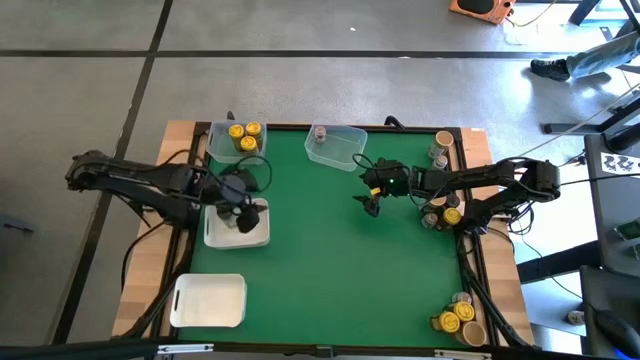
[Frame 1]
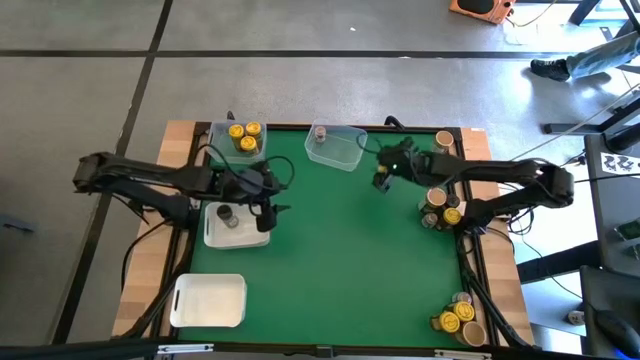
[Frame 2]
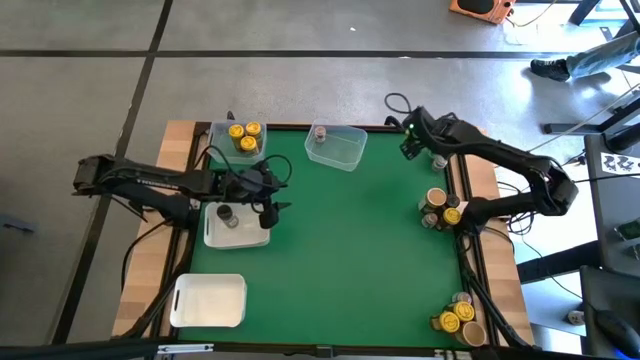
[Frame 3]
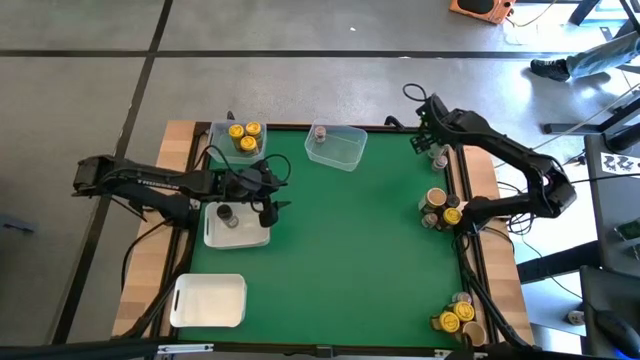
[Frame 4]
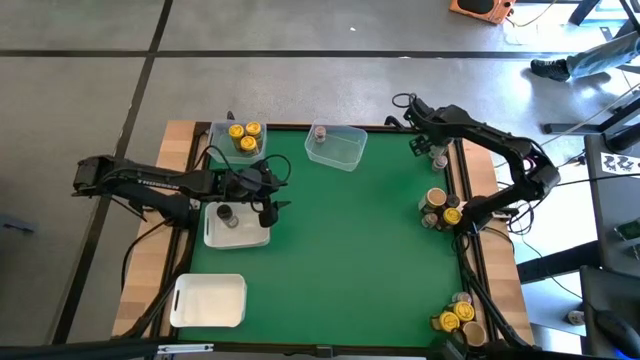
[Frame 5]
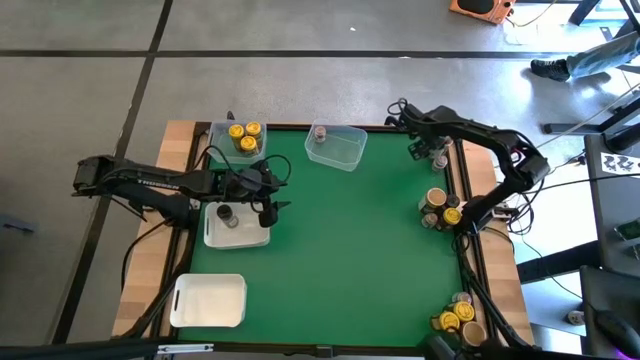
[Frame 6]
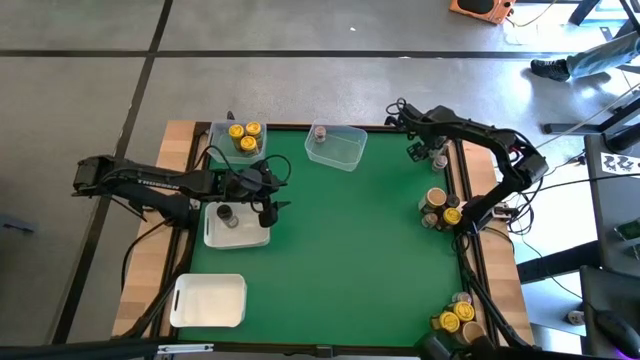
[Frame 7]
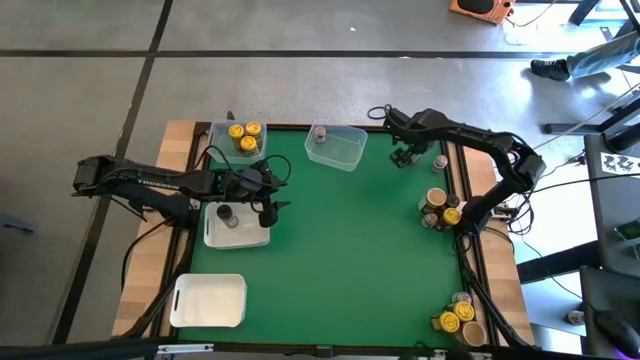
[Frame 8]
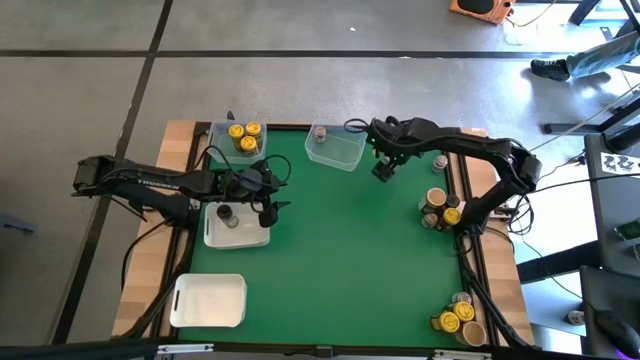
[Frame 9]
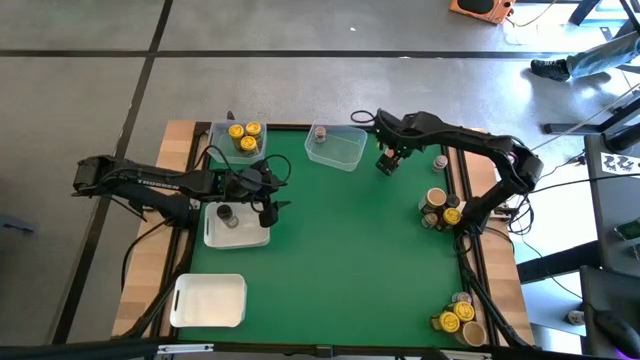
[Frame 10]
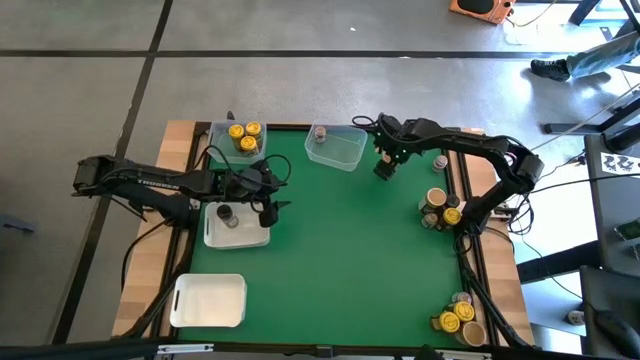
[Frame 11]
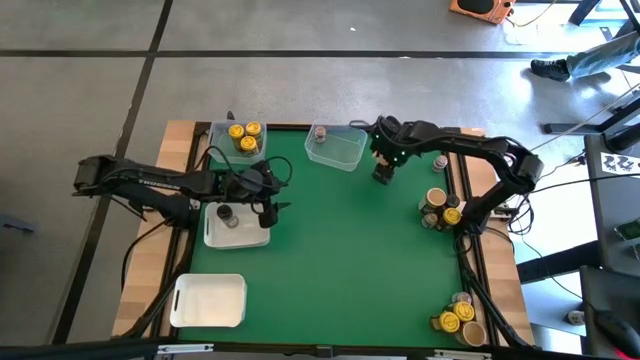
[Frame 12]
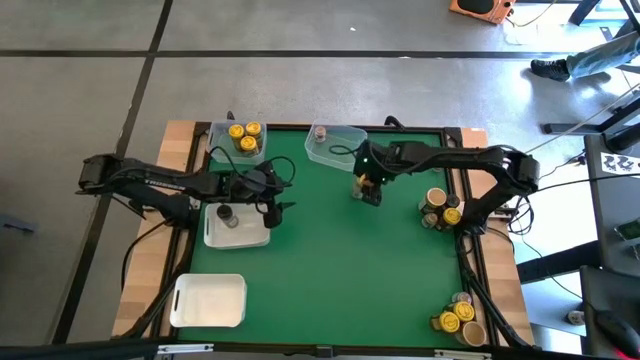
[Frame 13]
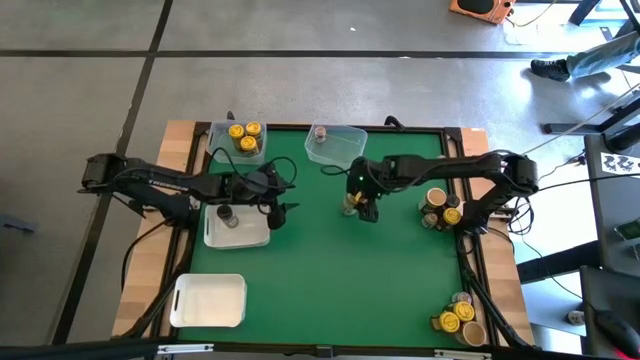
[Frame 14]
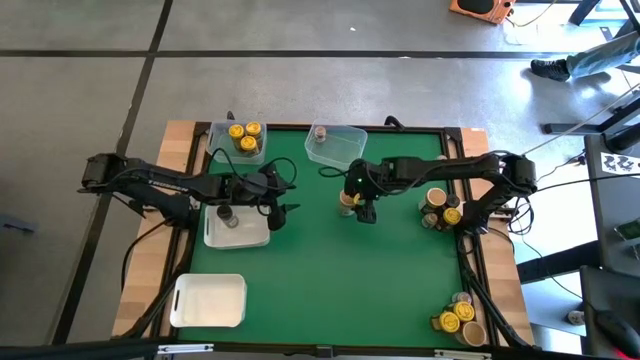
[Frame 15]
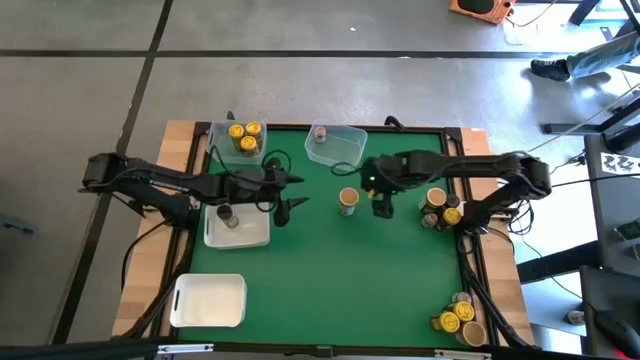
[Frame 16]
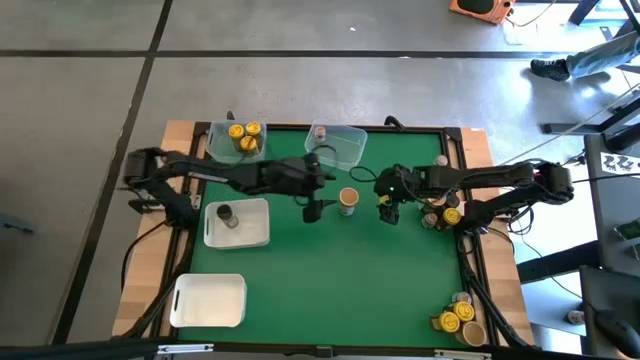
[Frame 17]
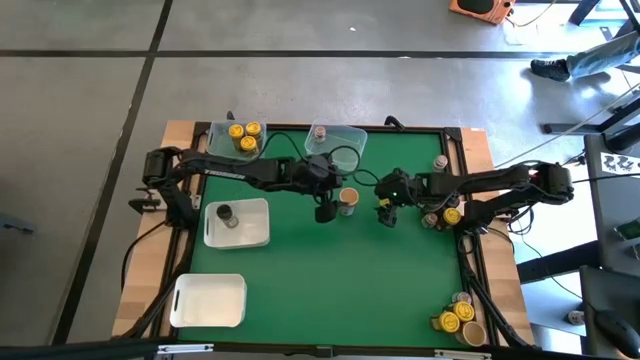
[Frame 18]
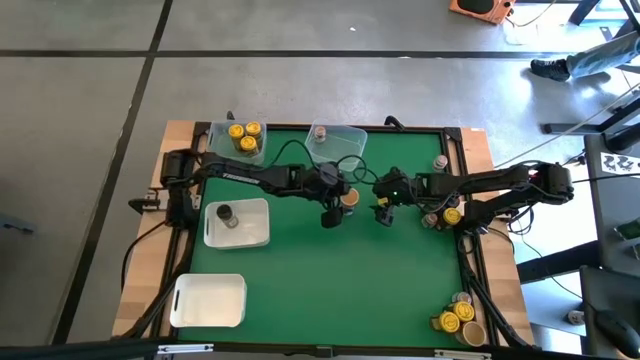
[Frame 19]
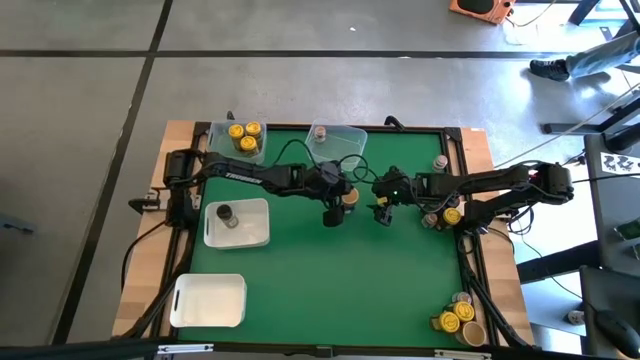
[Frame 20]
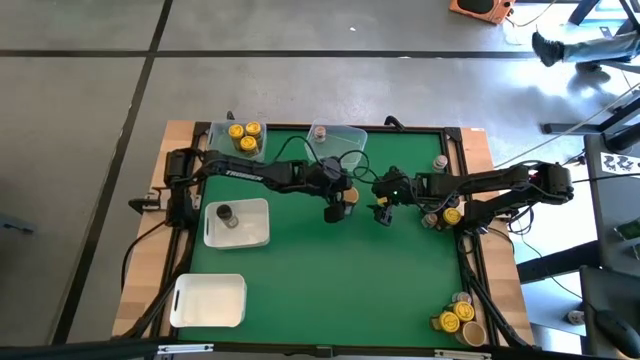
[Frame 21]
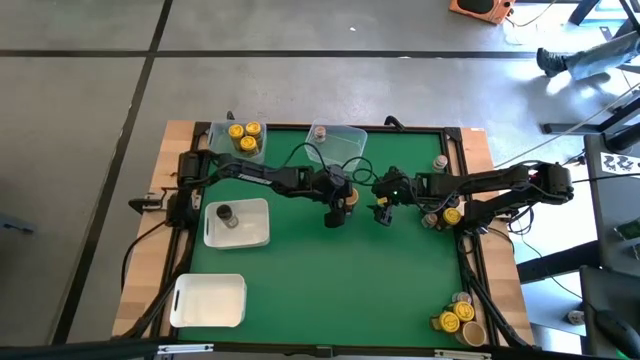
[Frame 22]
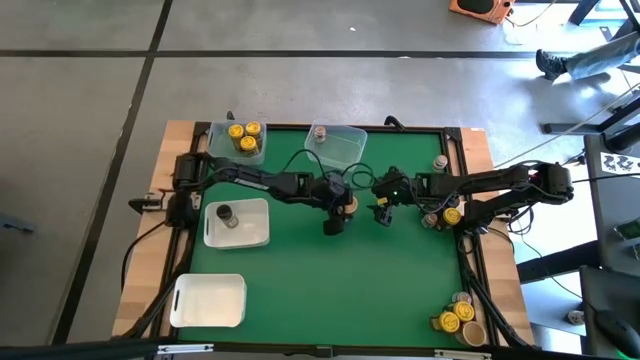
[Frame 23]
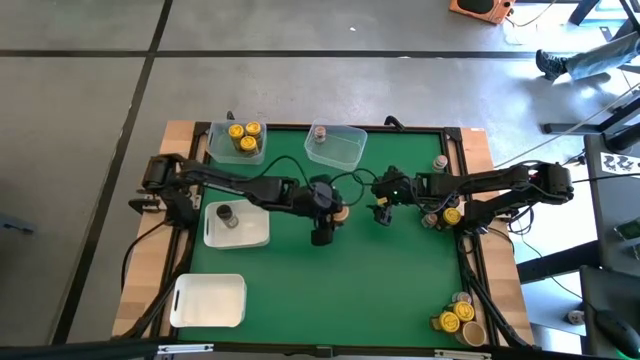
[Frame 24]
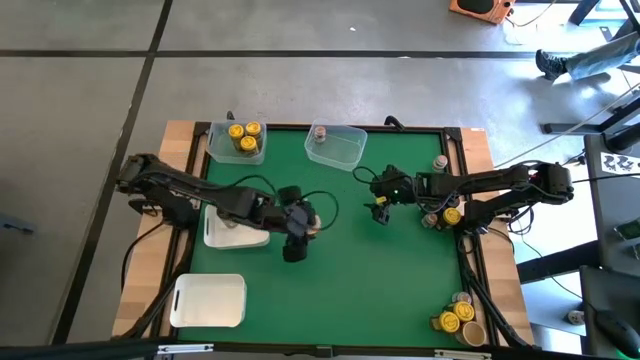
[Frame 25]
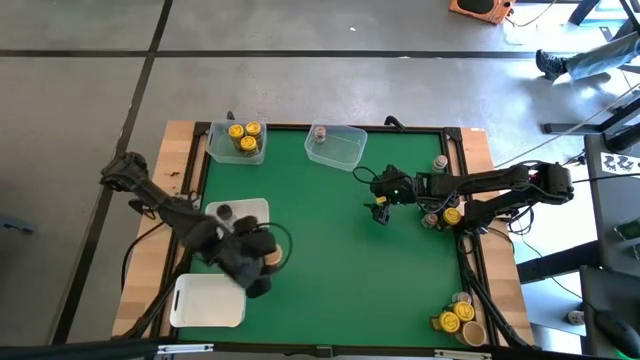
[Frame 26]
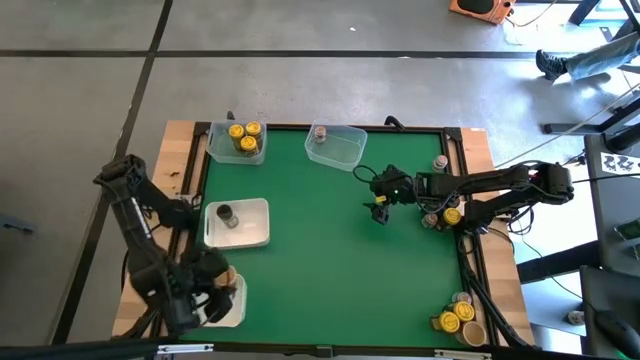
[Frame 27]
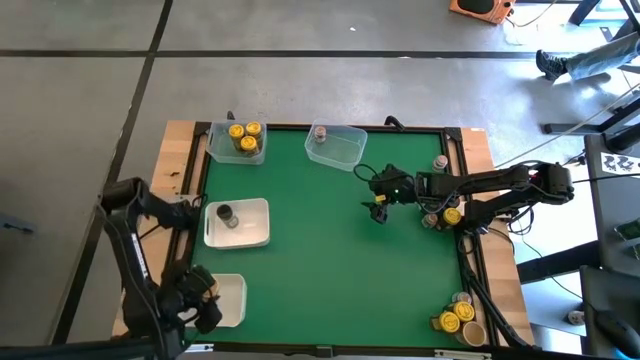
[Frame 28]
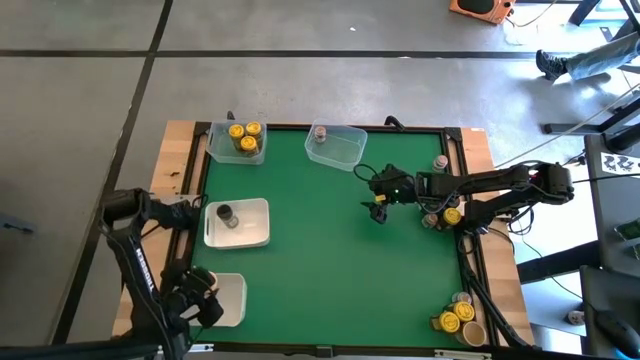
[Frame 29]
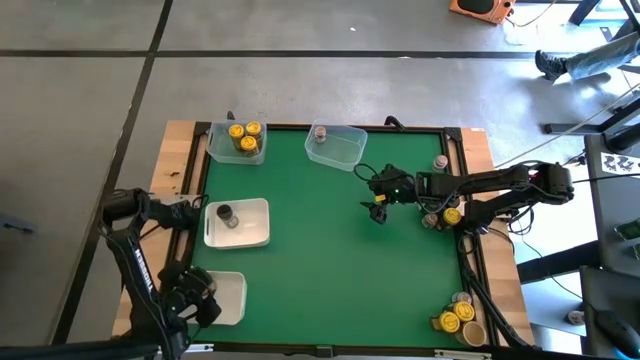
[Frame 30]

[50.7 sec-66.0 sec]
Task: Sort spices by type
Put the gold seasoning bottle into the bottom white bin

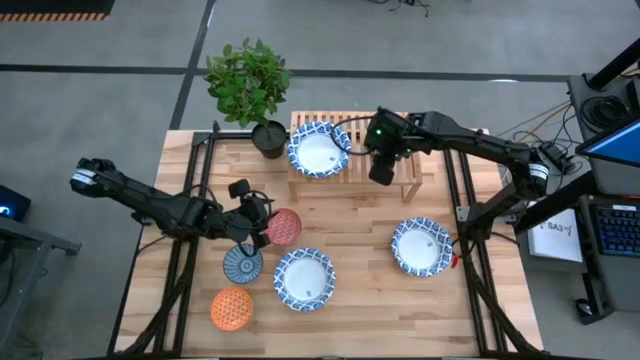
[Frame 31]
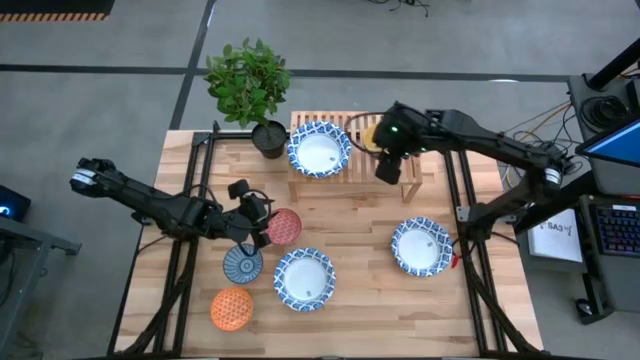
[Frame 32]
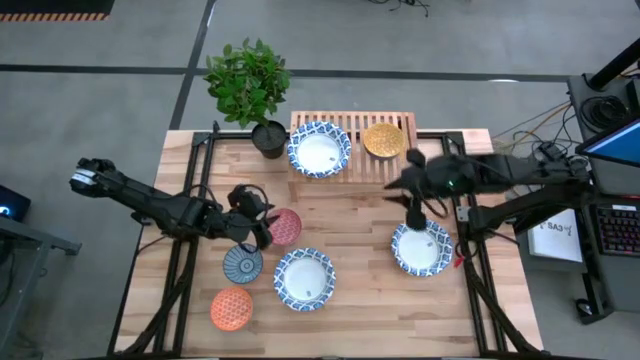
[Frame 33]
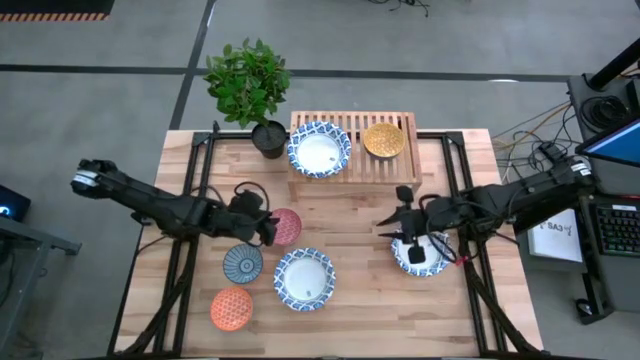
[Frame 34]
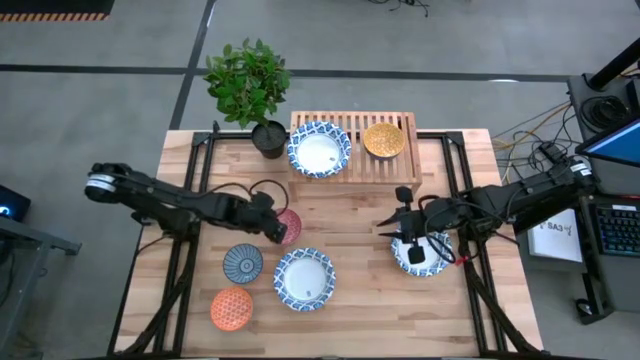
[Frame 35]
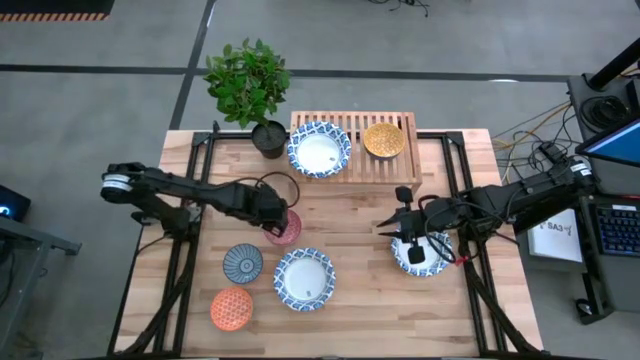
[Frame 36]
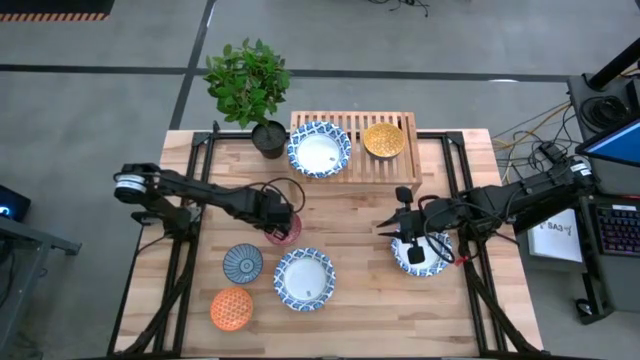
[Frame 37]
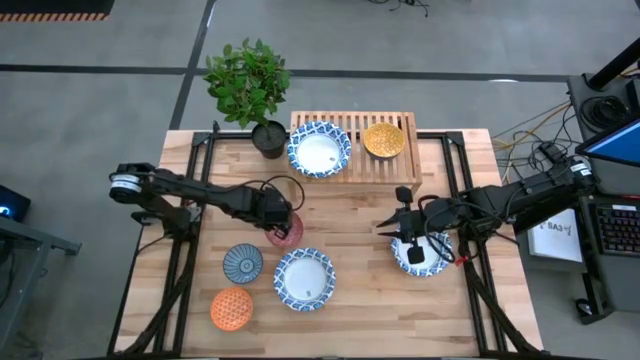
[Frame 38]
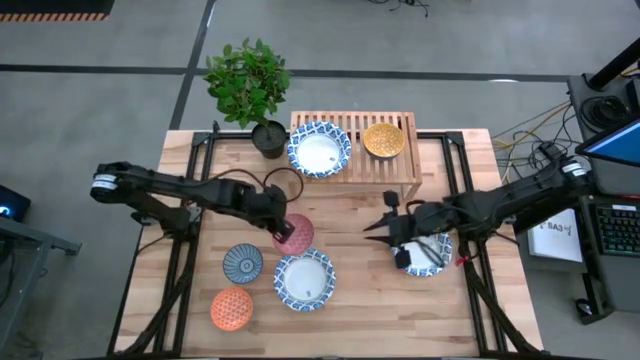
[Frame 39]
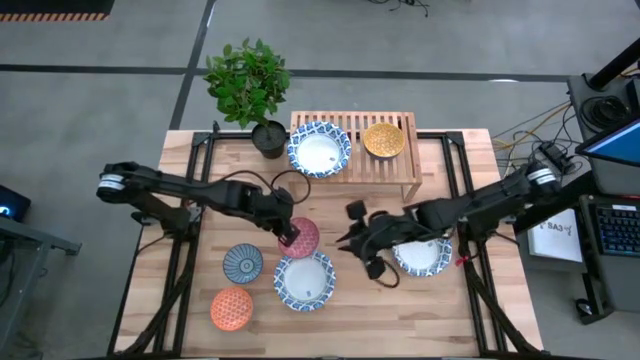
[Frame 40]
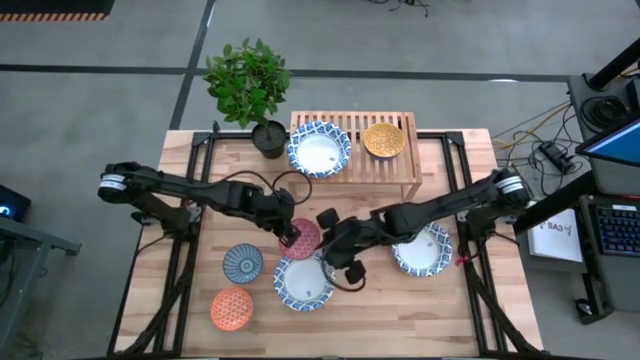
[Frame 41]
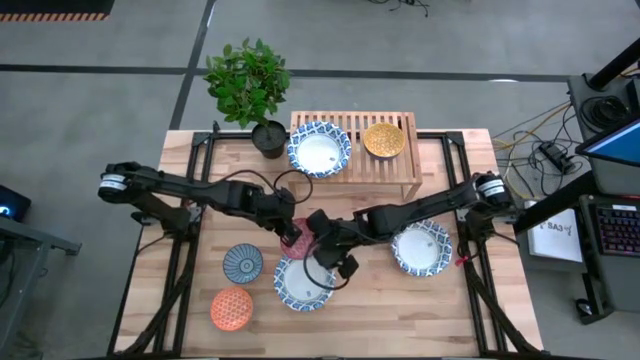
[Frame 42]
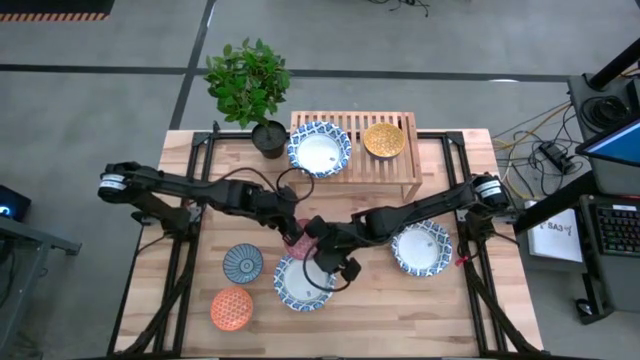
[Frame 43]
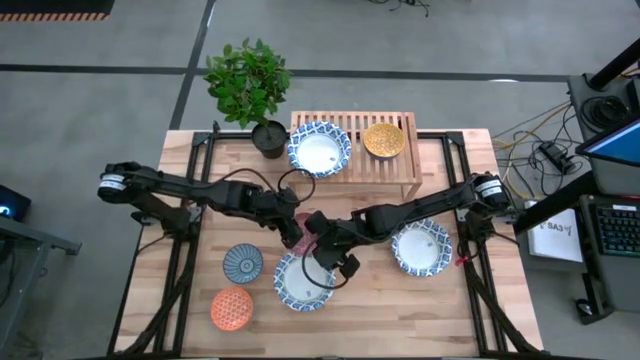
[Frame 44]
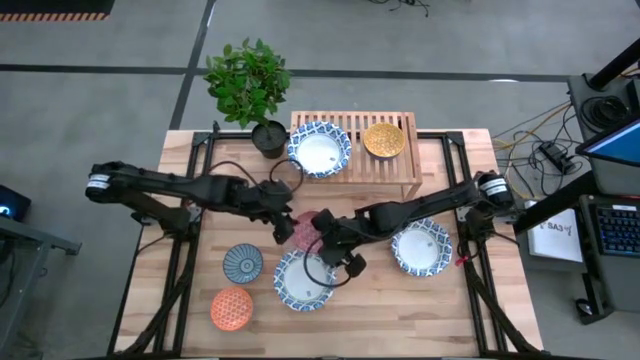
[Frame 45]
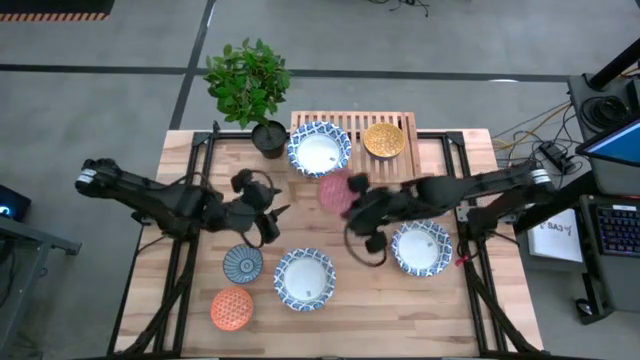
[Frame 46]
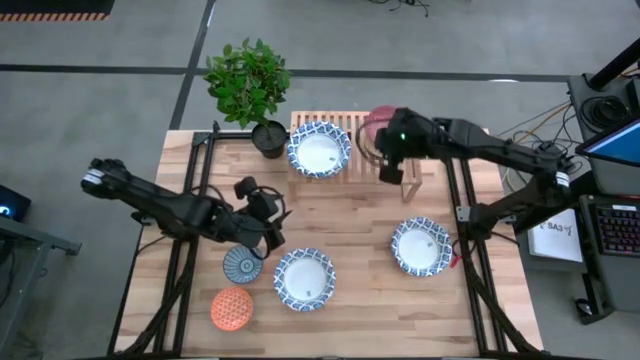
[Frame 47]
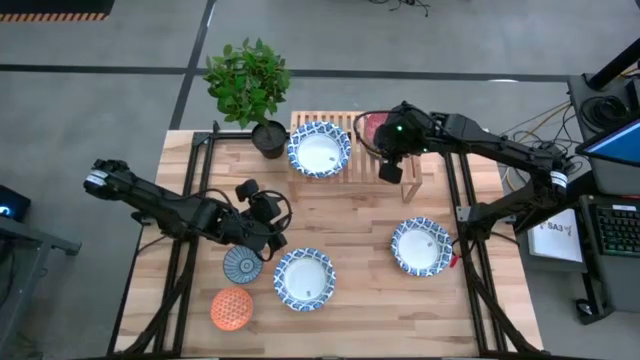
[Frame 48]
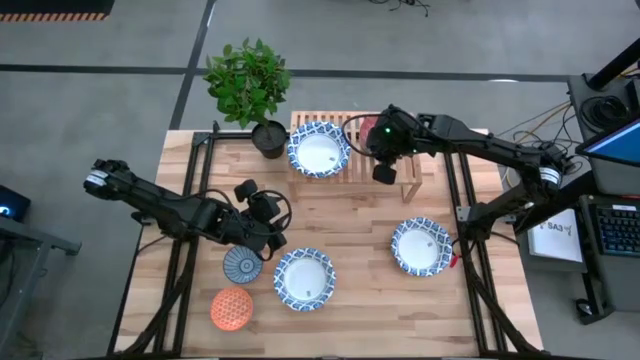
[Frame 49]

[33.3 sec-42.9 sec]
Task: Place and stack bowls onto a shelf
Stack the red pattern bowl on top of the yellow bowl on the shelf
